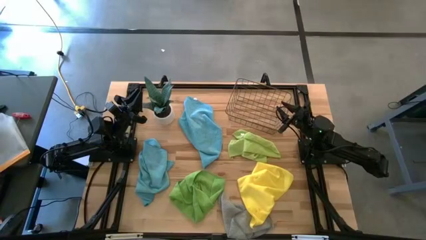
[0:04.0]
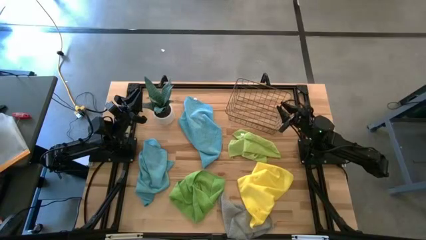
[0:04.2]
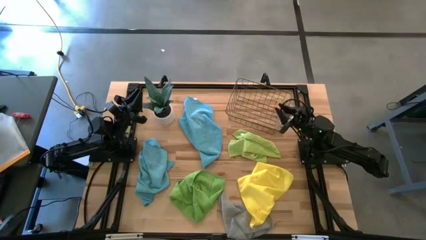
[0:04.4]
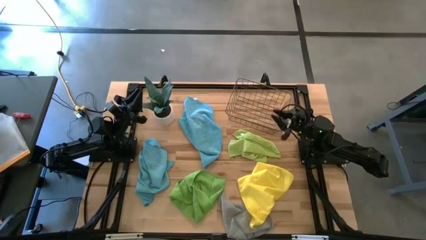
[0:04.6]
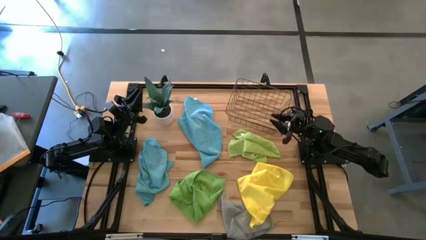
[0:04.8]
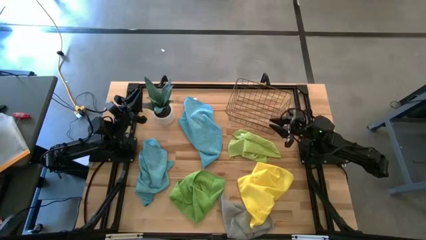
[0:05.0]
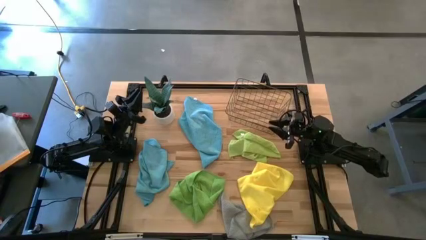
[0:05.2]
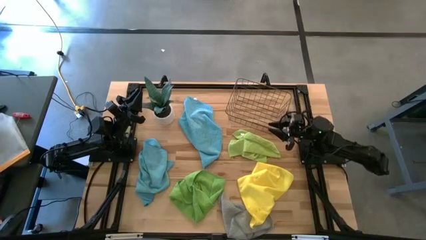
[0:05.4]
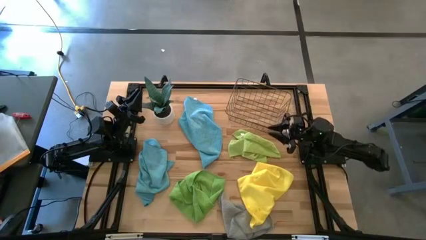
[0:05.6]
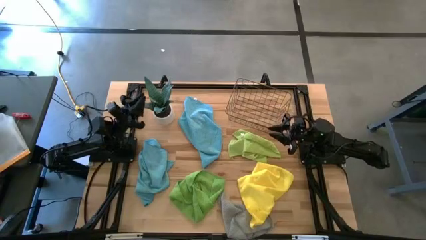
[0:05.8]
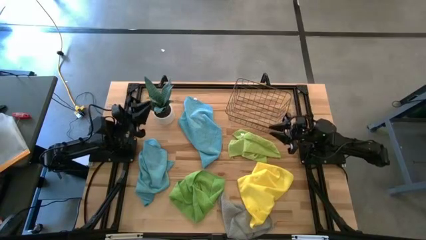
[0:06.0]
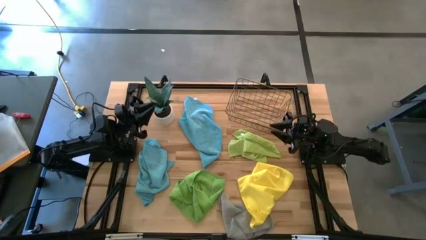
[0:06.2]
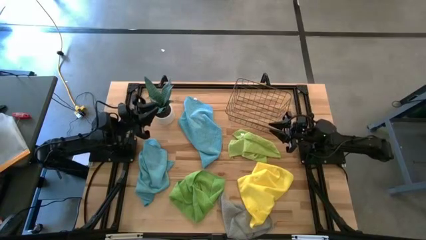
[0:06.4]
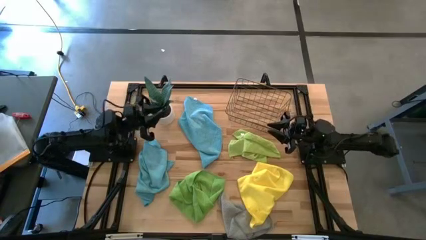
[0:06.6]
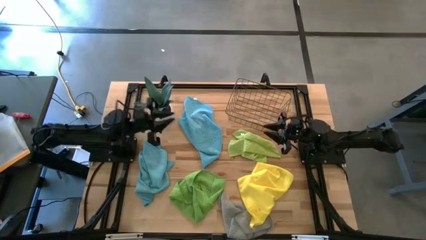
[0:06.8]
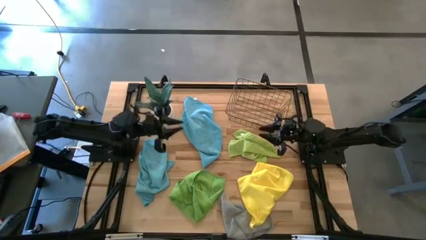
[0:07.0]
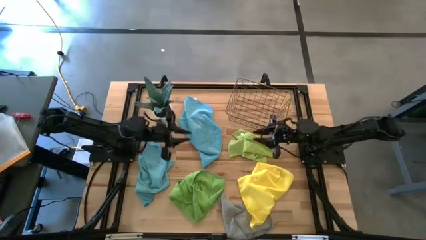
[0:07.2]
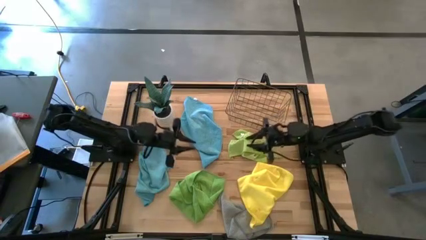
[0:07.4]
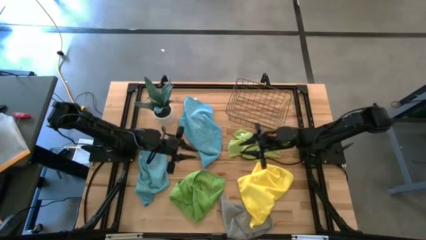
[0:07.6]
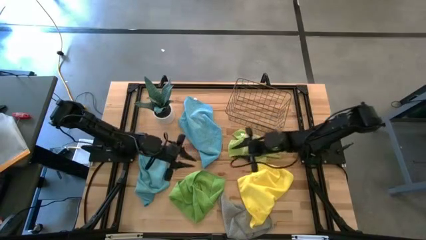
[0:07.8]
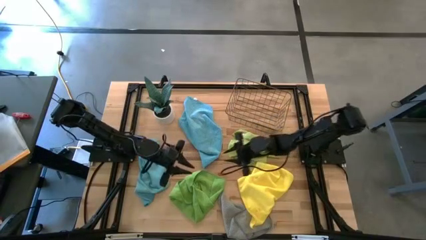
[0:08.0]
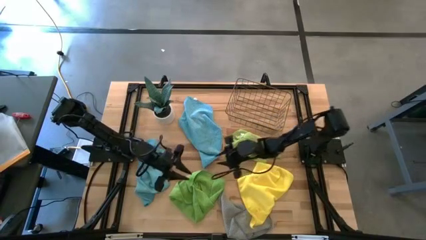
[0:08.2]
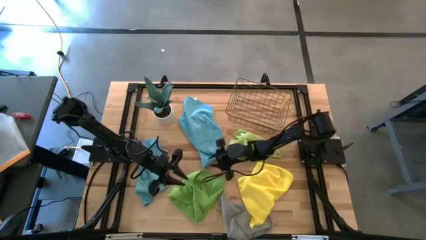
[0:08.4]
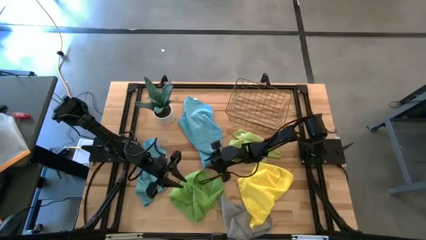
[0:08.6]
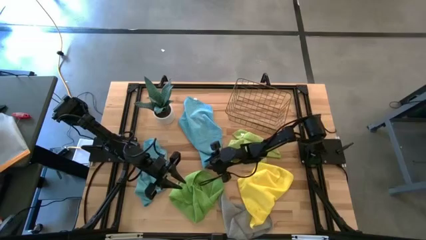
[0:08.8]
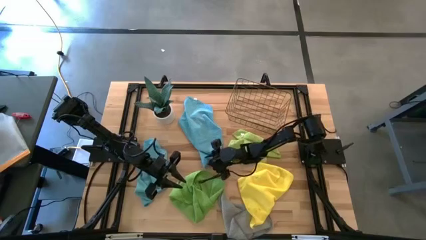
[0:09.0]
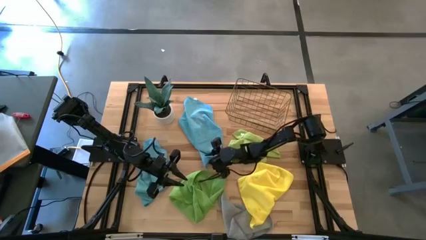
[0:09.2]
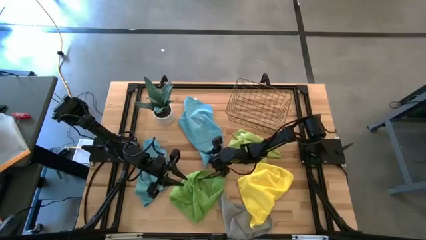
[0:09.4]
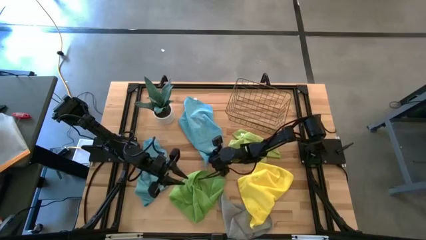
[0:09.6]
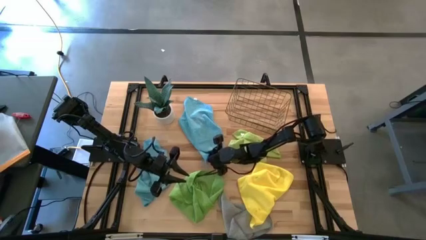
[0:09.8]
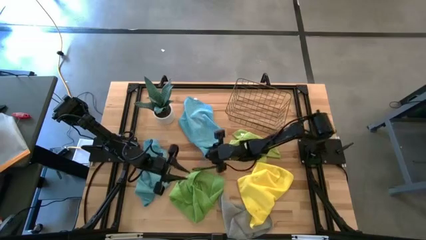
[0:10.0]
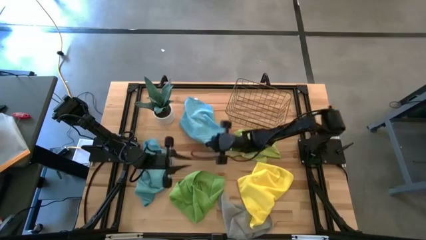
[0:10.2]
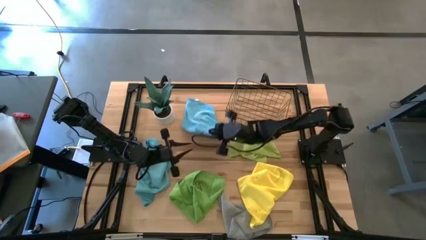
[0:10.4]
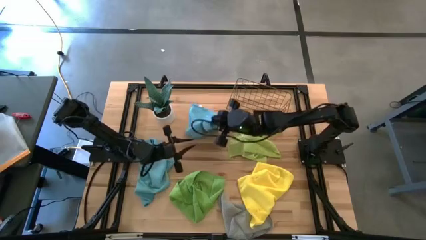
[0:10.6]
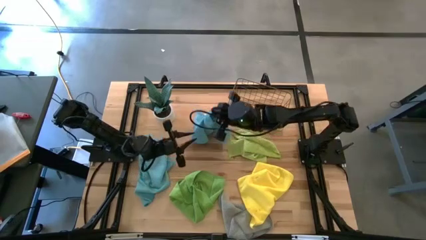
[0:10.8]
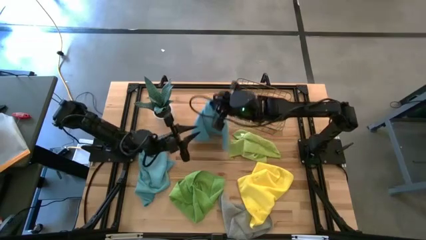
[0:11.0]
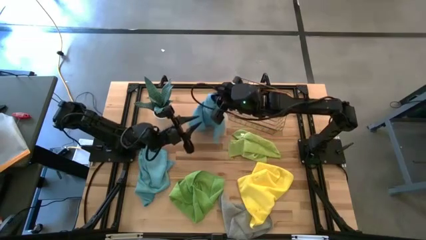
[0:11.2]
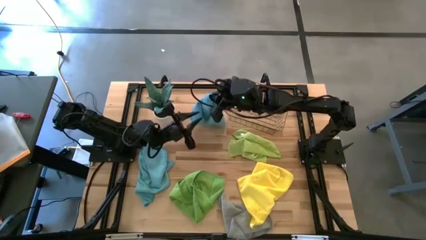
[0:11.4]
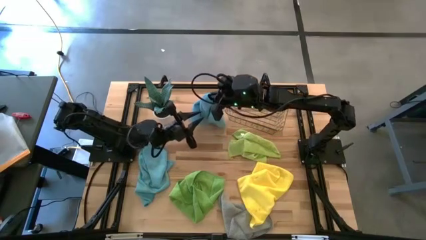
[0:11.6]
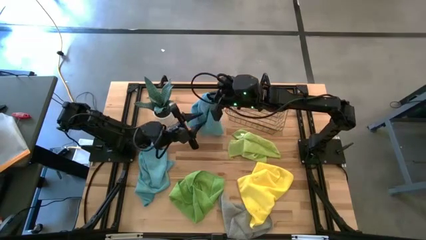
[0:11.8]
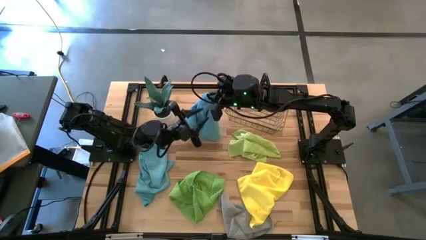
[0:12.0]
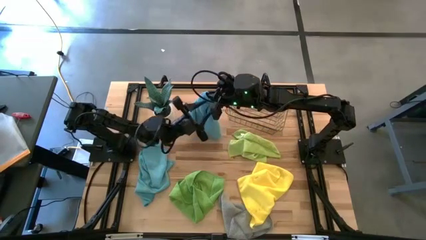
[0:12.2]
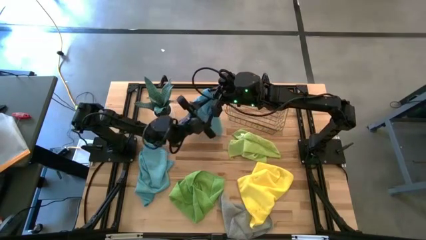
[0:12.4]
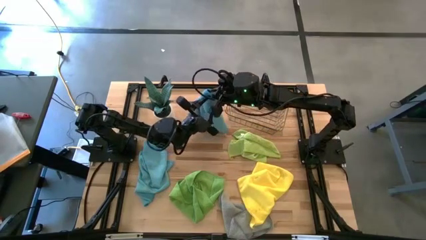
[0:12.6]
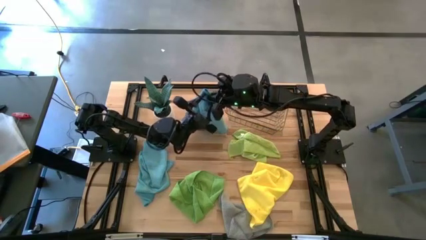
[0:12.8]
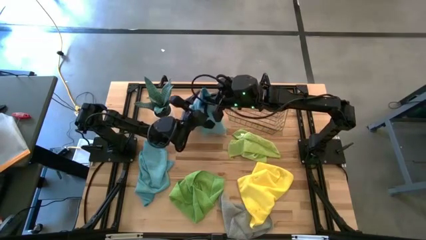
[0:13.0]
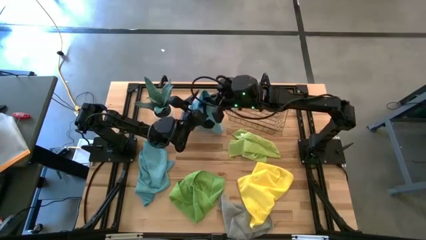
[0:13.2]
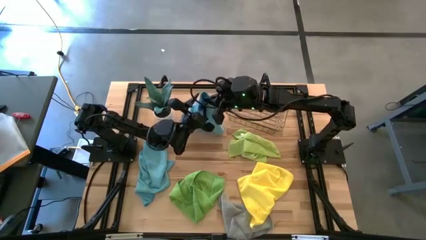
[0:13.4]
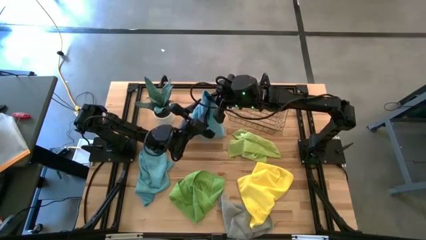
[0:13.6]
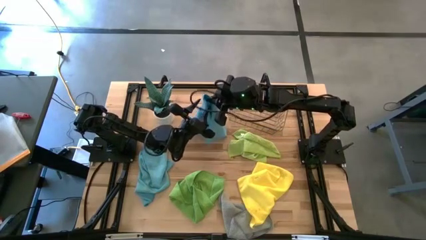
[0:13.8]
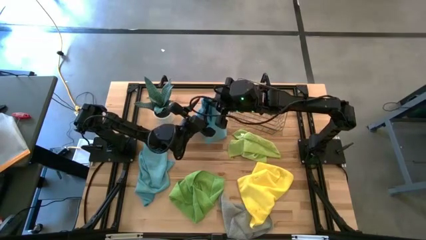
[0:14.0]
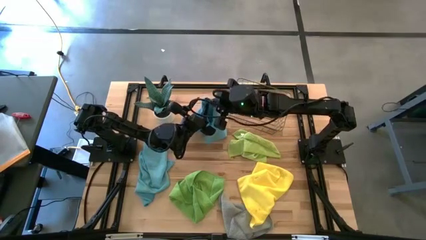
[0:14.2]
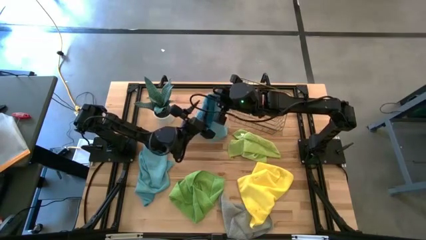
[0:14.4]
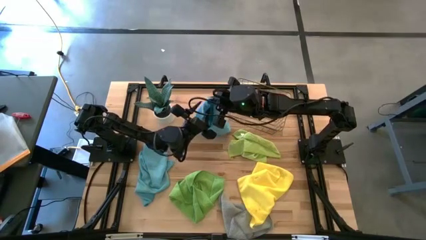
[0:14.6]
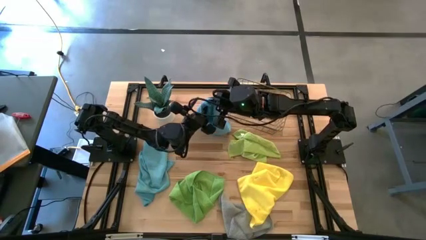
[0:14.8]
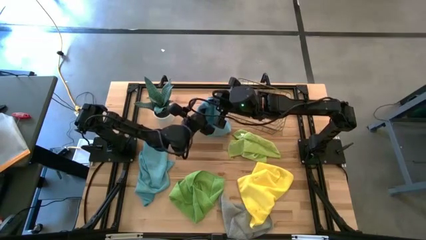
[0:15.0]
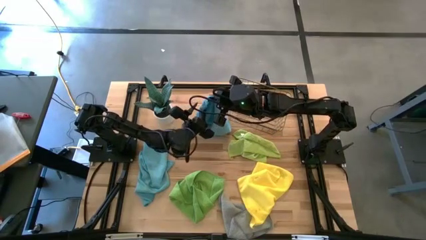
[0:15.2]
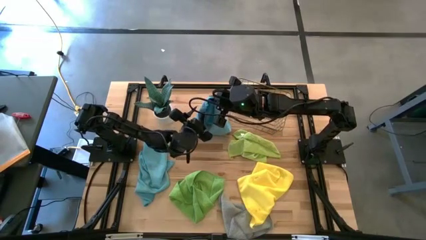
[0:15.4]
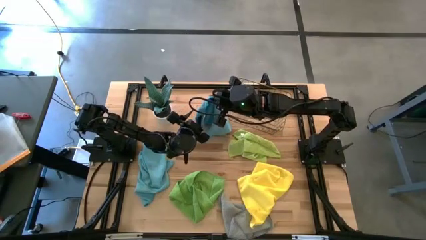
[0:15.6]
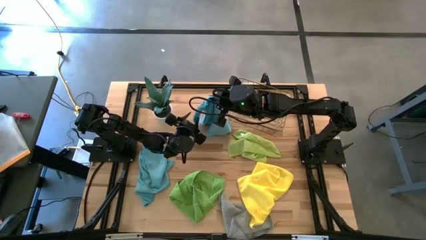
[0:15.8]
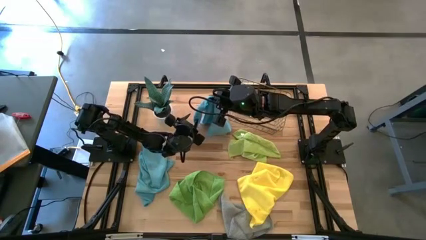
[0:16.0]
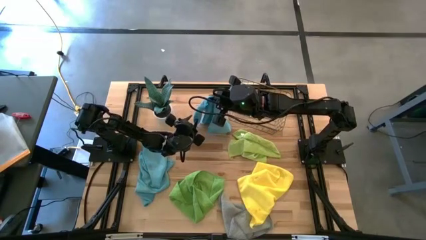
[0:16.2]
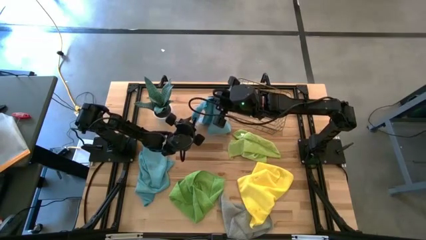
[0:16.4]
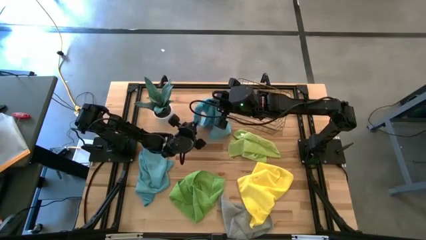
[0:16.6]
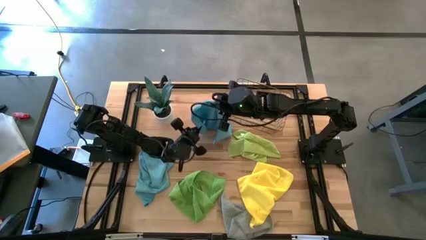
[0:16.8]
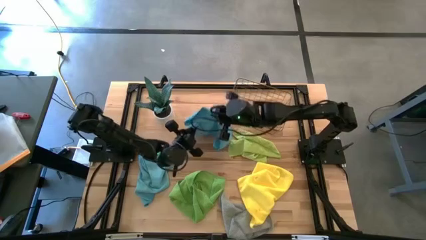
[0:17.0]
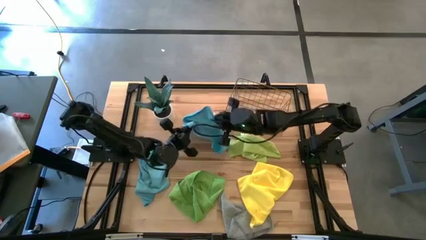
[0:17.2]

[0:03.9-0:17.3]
Task: Fold microfiber towels
Fold the top blue towel
